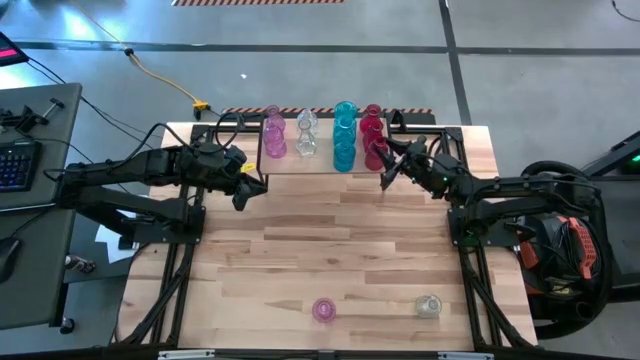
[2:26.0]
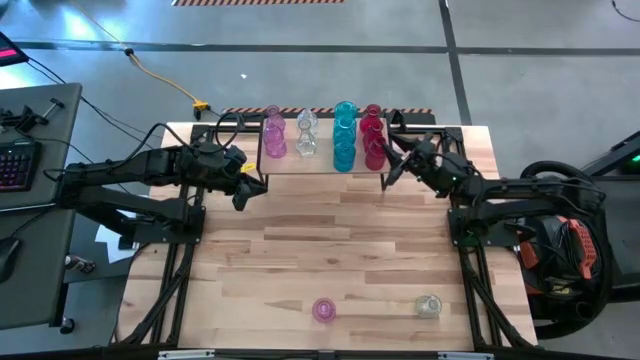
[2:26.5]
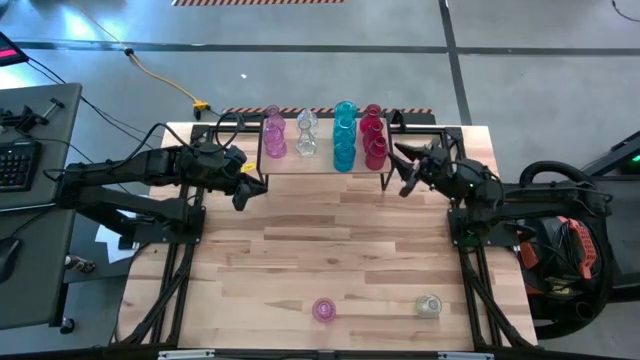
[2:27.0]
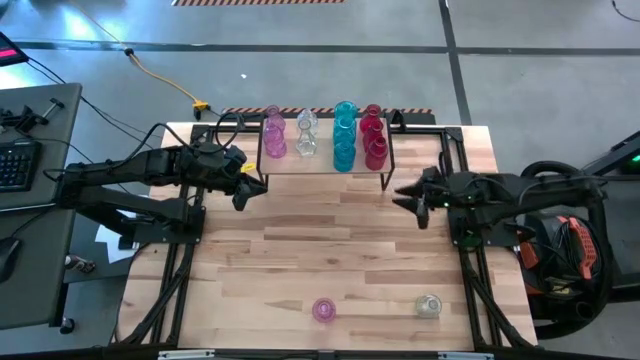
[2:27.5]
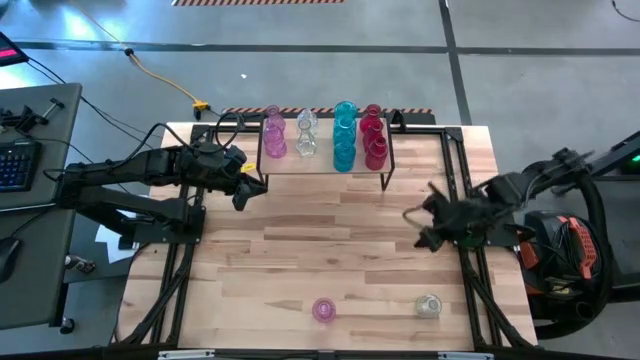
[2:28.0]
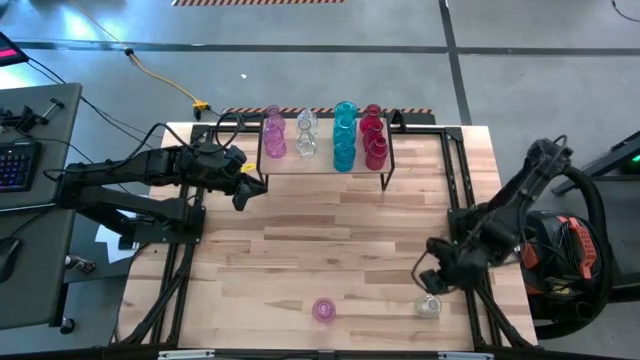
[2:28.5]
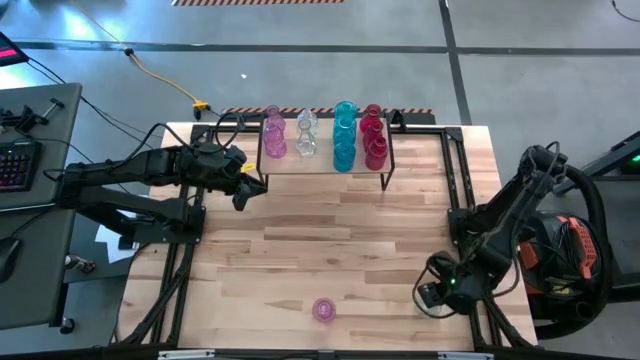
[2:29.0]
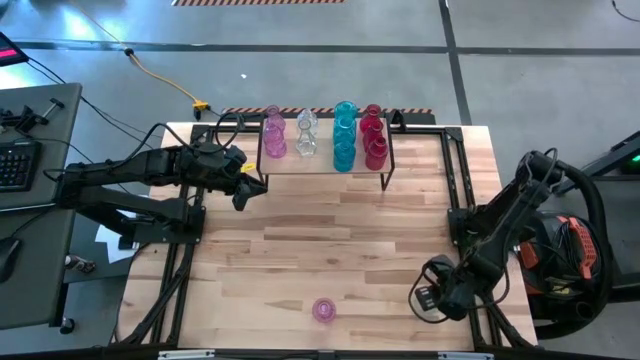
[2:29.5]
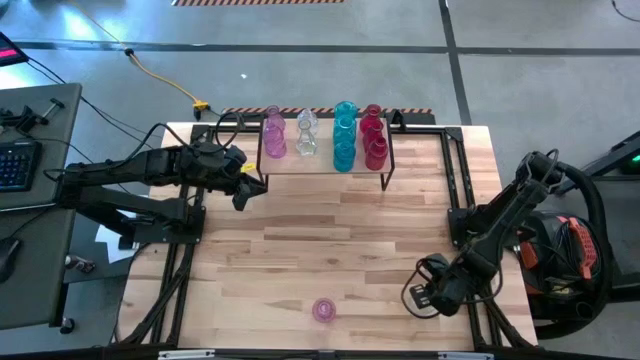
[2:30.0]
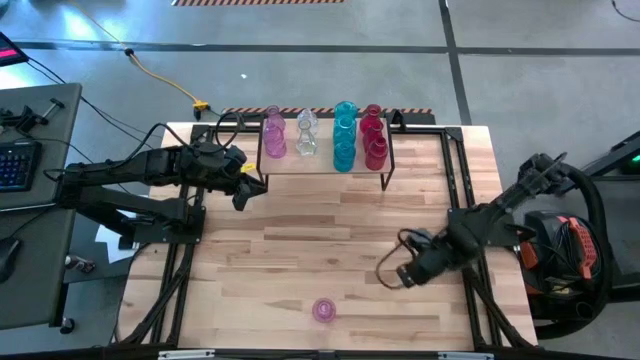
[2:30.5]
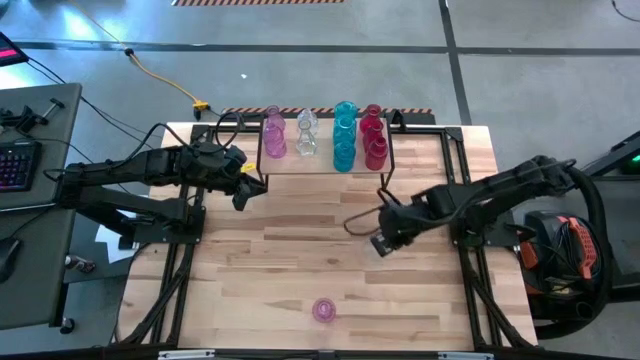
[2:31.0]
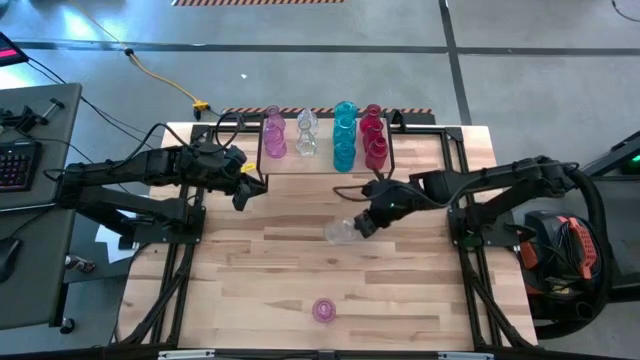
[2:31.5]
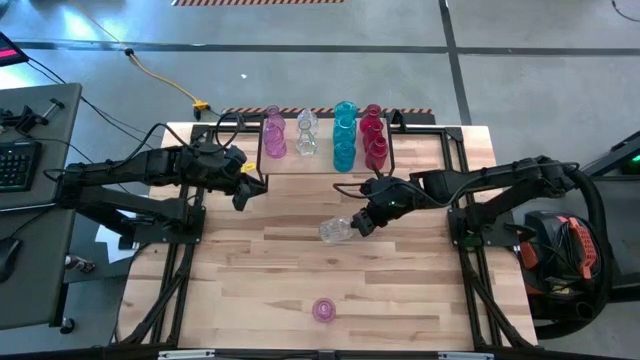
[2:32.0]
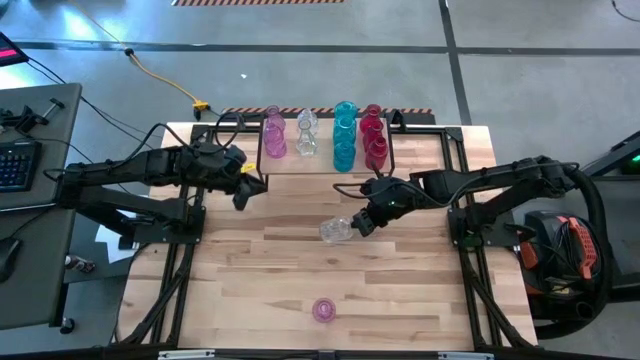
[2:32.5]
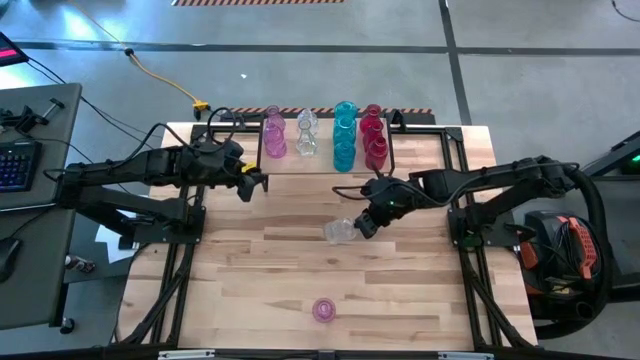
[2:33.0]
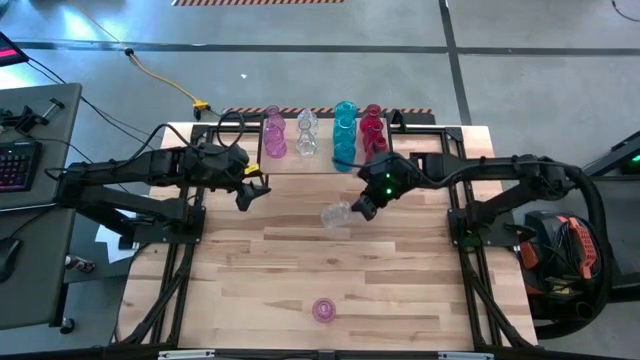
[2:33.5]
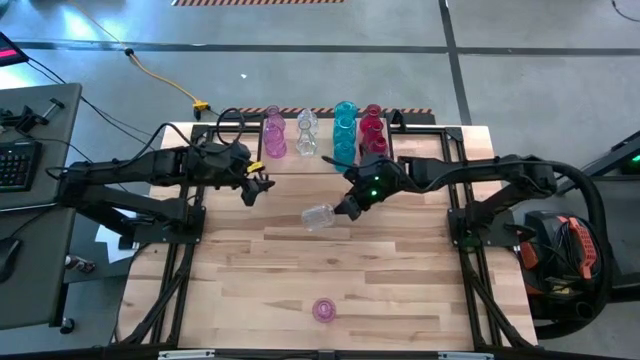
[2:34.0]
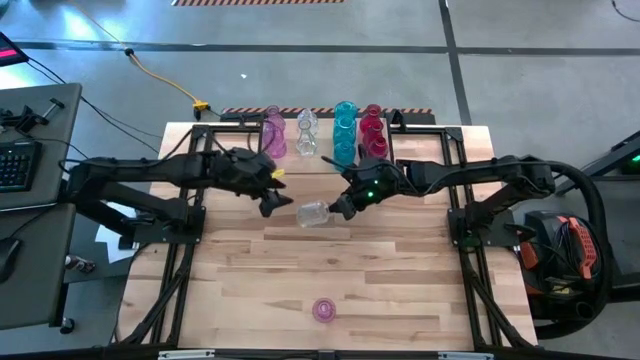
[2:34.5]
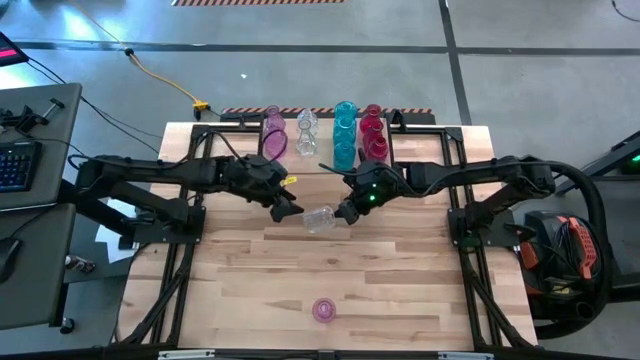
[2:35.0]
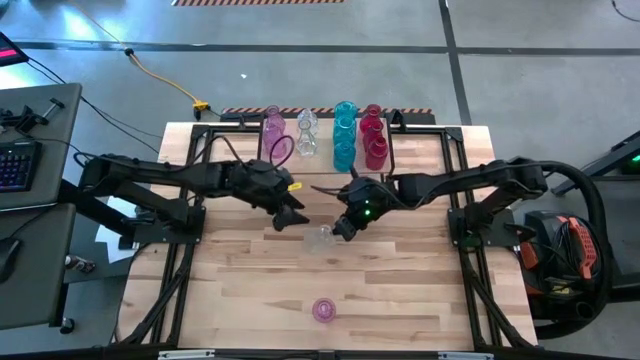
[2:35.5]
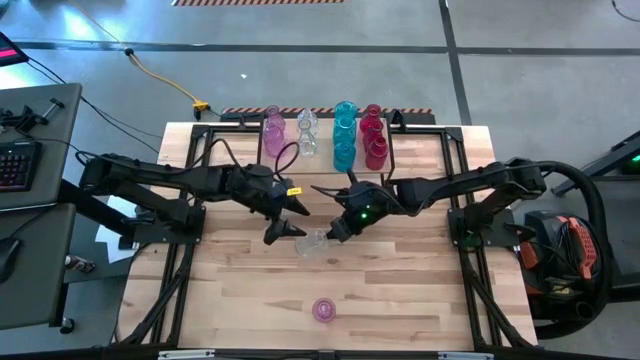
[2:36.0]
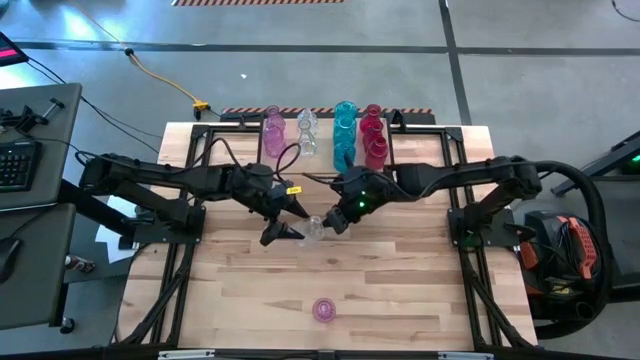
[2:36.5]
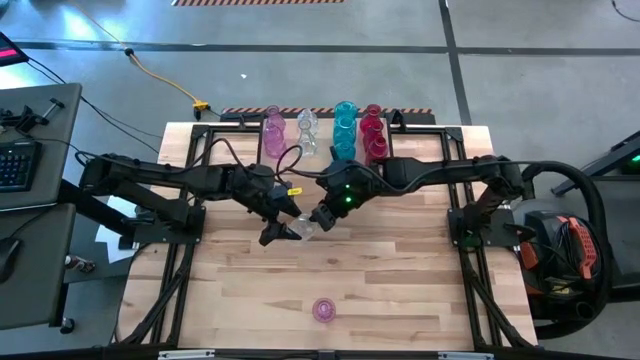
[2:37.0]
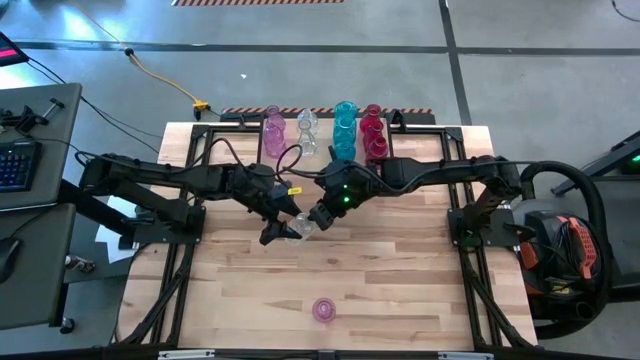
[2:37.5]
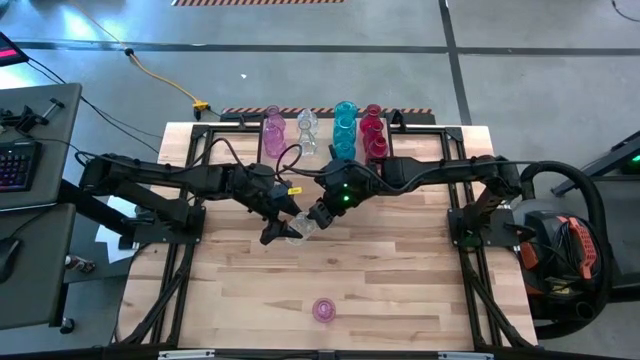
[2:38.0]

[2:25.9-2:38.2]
Task: sort vases onto shelf
Put the transparent vase on the shelf aligned with the other transparent vases

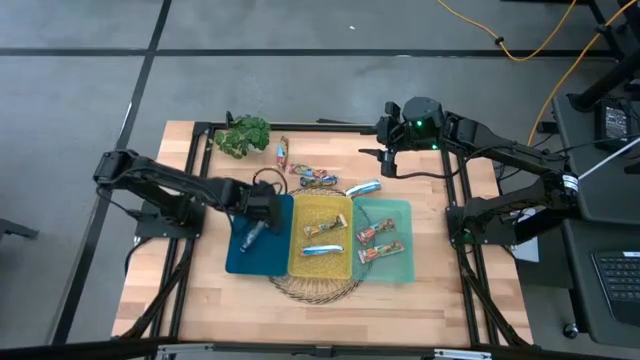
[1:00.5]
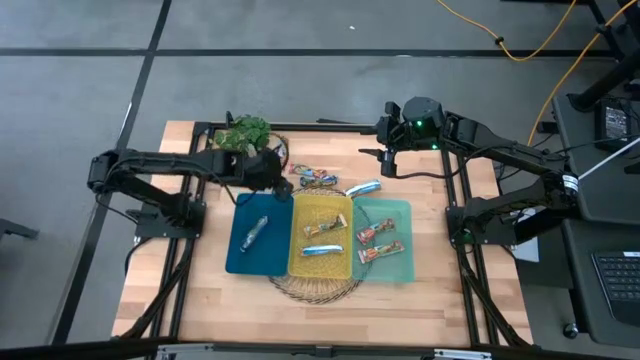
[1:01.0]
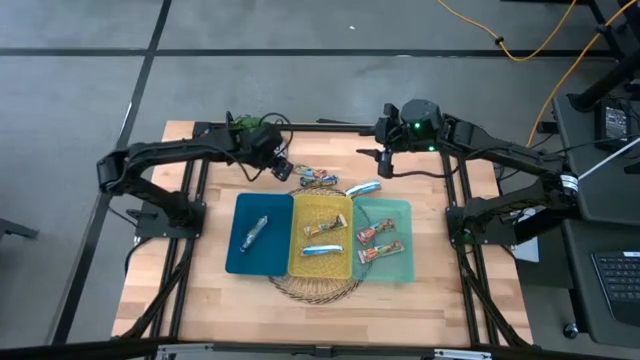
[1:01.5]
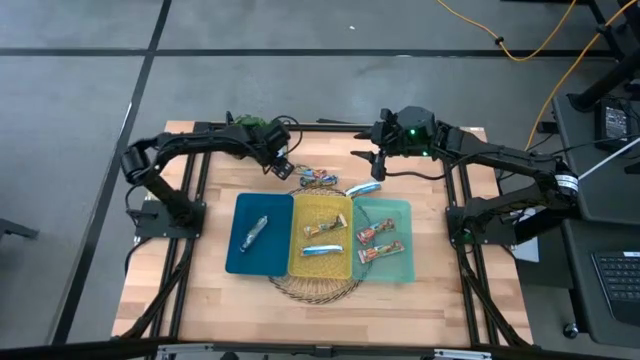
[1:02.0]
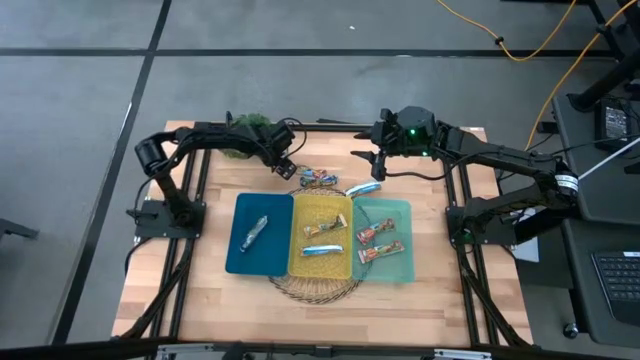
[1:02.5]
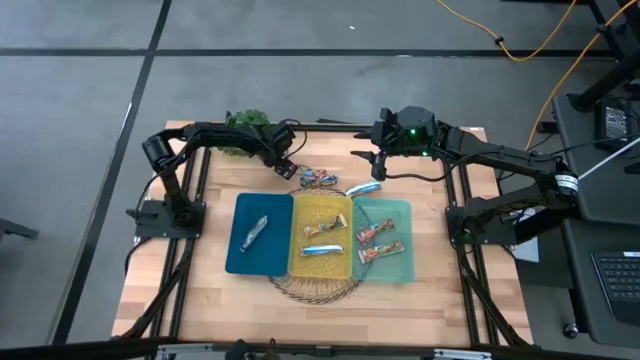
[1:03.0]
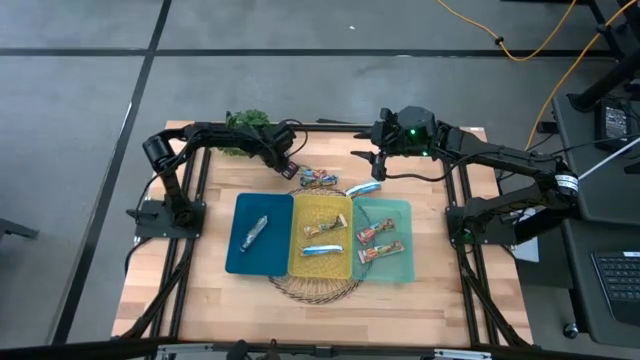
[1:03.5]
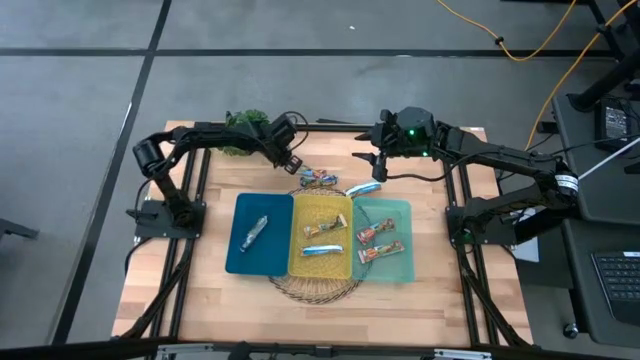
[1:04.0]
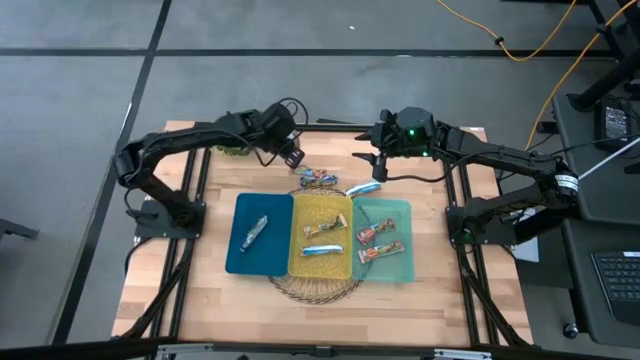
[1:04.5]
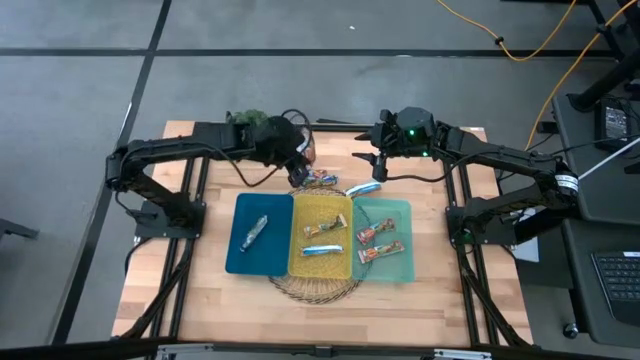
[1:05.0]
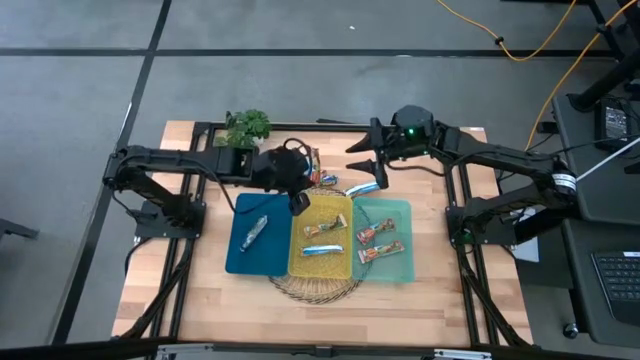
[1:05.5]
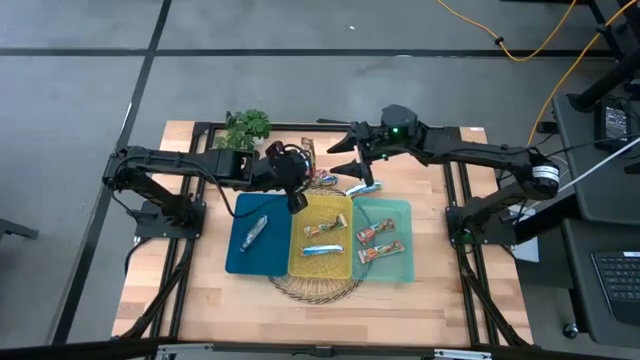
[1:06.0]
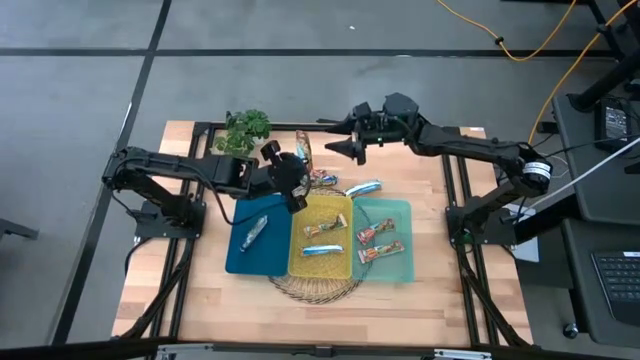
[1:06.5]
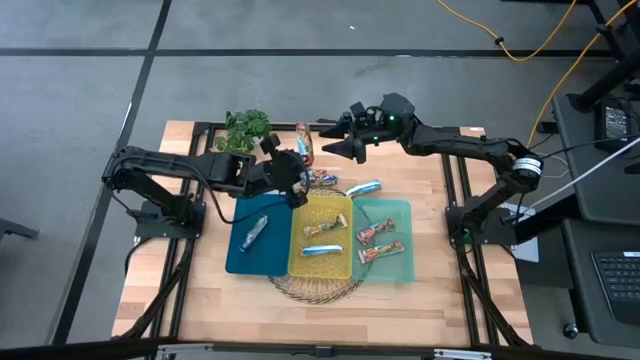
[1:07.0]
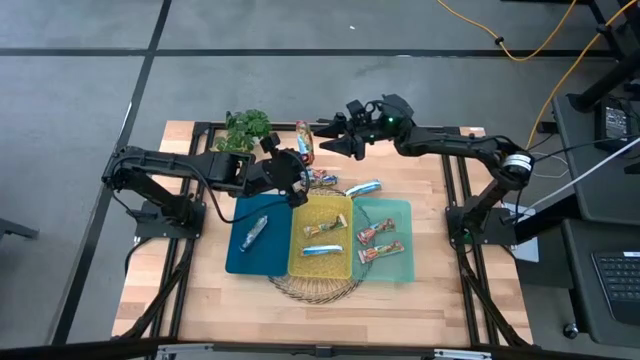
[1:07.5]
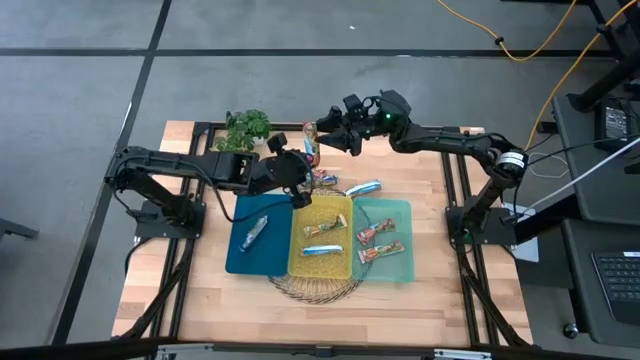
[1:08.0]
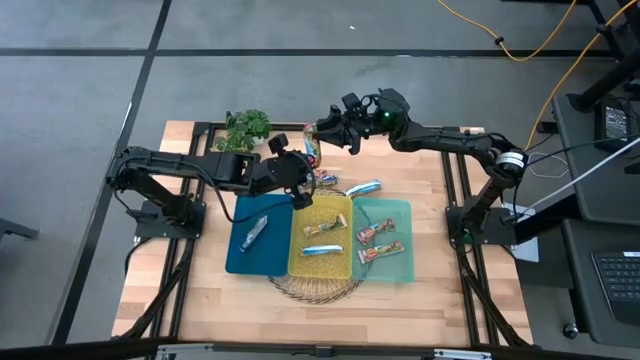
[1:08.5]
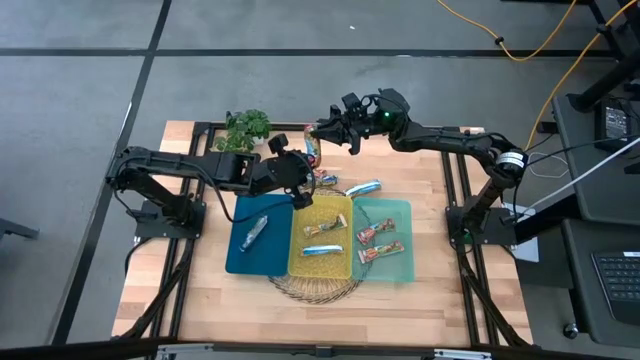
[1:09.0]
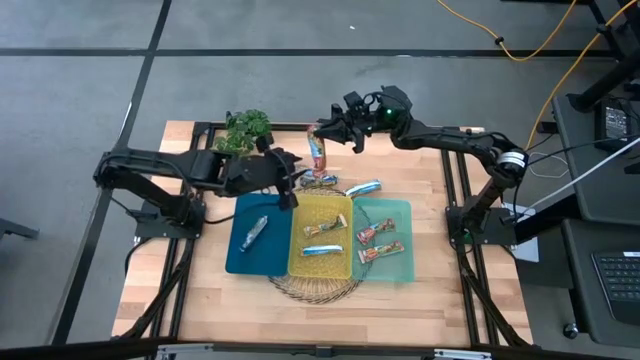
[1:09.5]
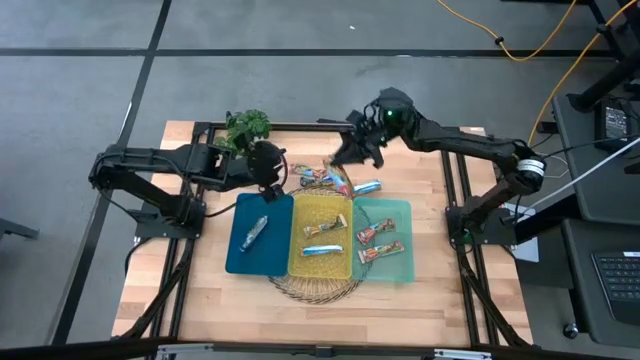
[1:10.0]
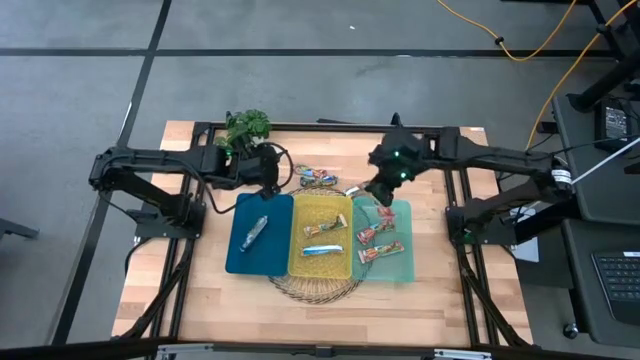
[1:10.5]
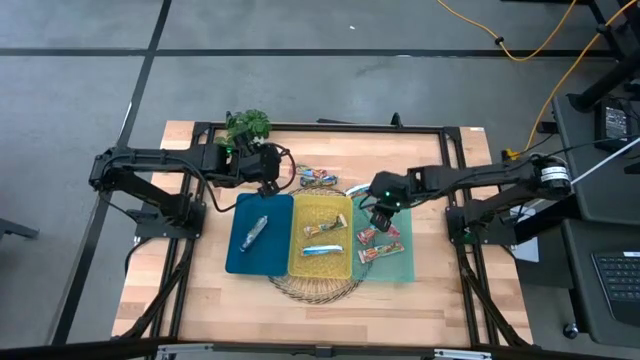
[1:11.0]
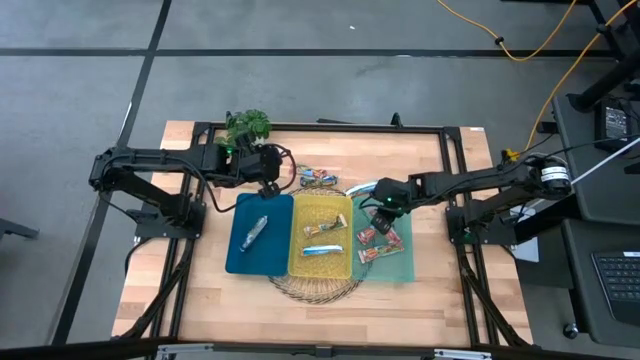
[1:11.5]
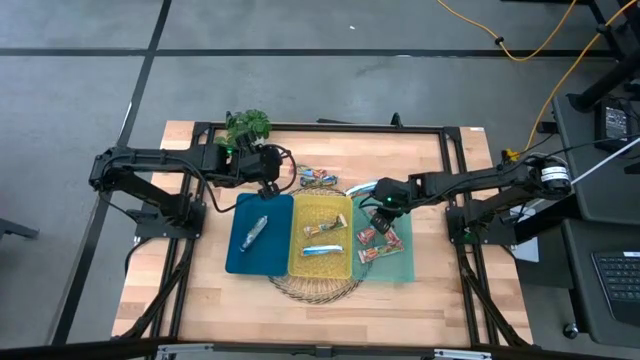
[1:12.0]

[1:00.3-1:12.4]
Task: Pick and place Granola Bars by type
Put the red granola bar into the green bin
